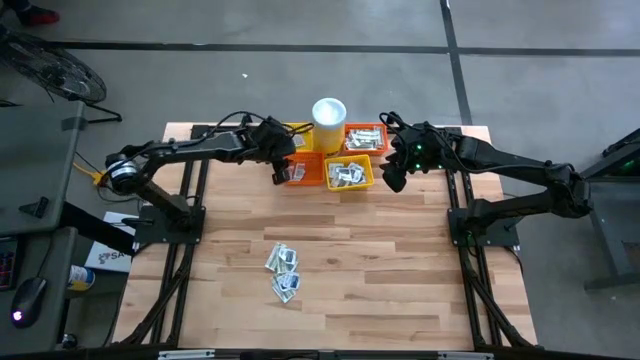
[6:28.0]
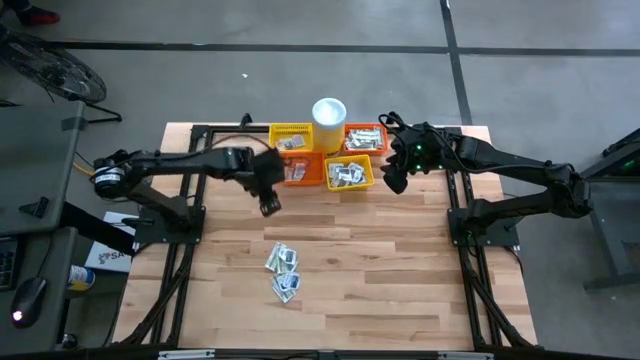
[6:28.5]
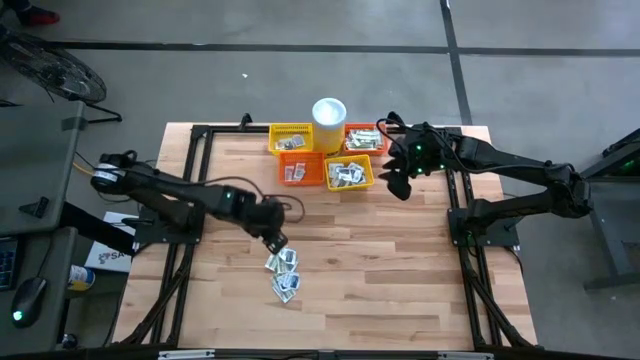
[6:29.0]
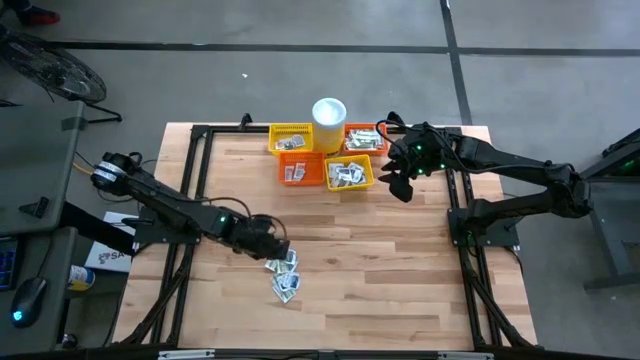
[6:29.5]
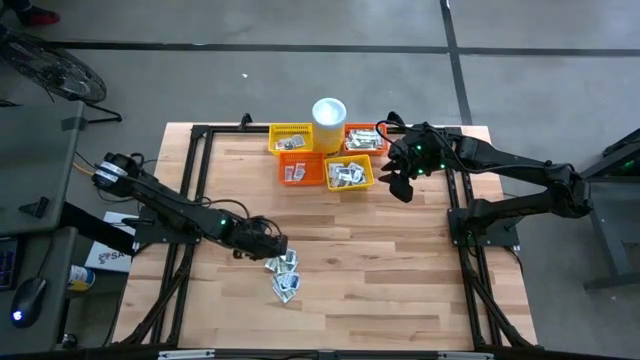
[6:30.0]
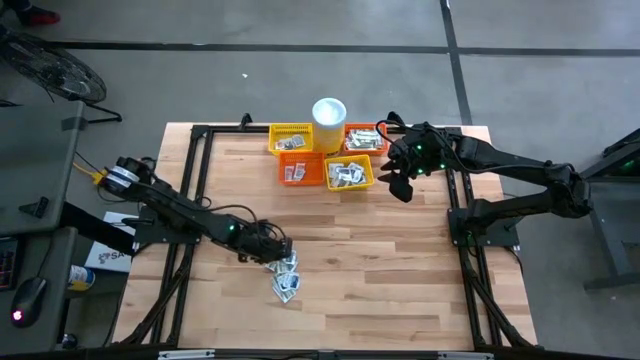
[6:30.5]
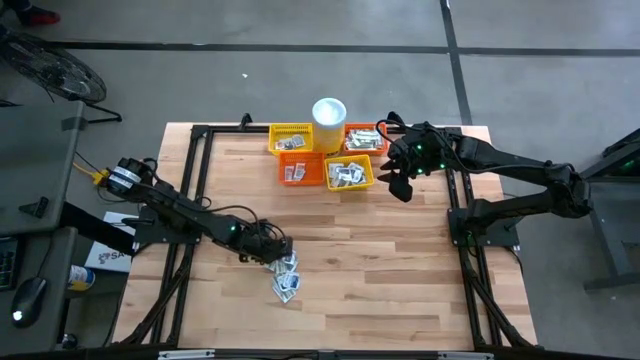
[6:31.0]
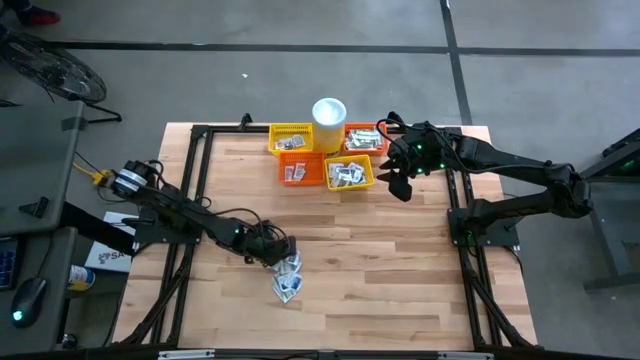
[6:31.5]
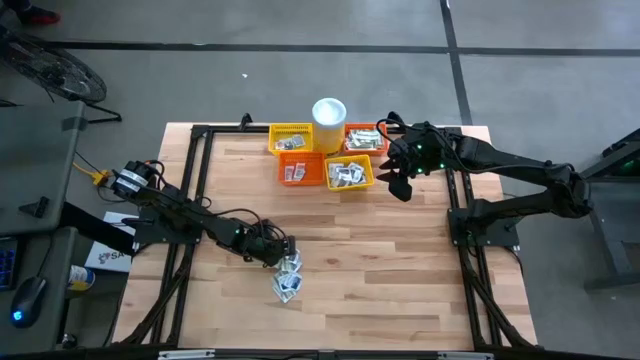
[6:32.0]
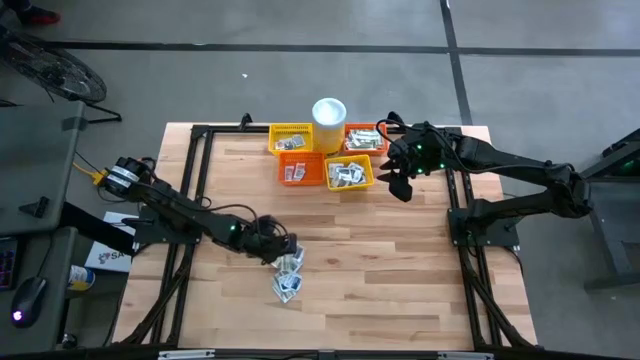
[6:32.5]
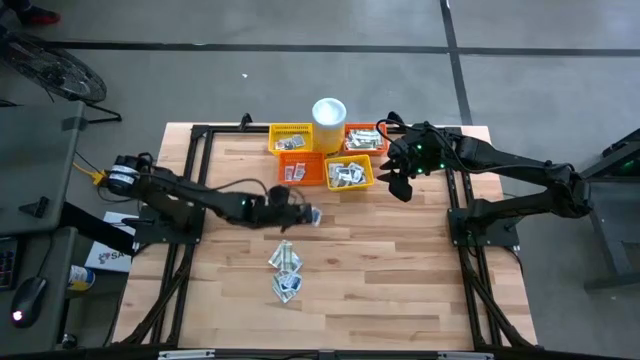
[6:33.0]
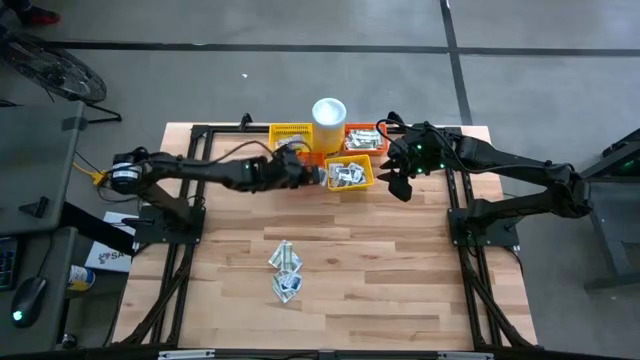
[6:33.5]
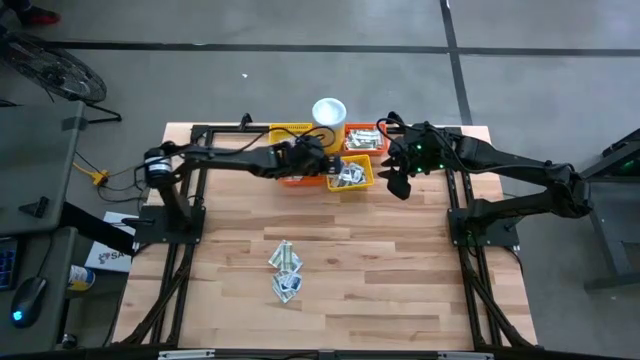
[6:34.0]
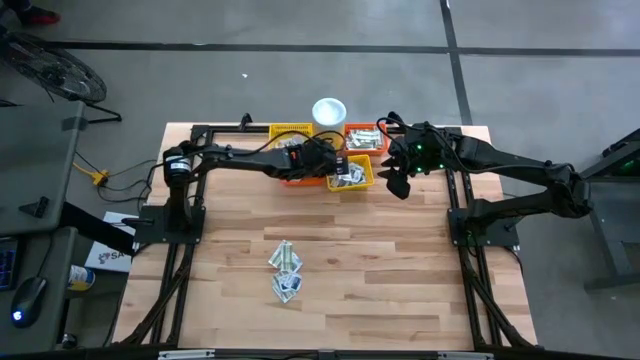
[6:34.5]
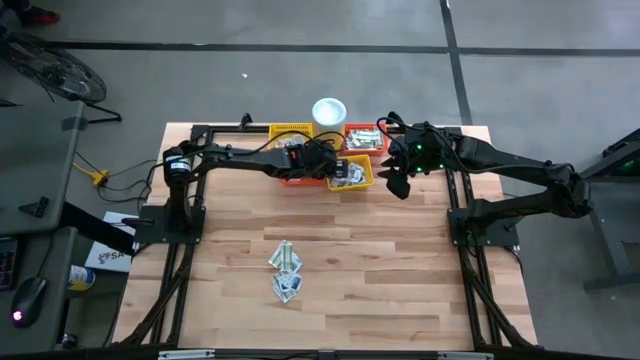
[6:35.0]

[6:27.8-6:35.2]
Task: Pick & Place First Aid Supplies
Put the black towelette pack into the bottom yellow basket

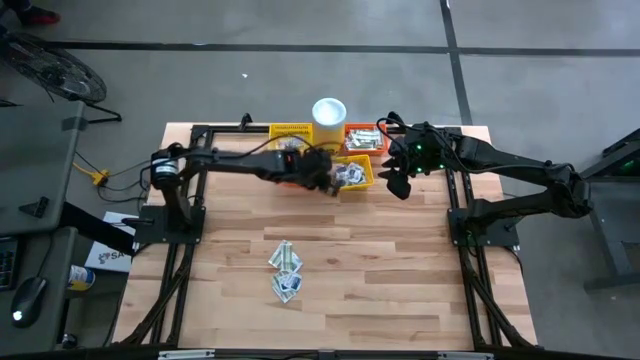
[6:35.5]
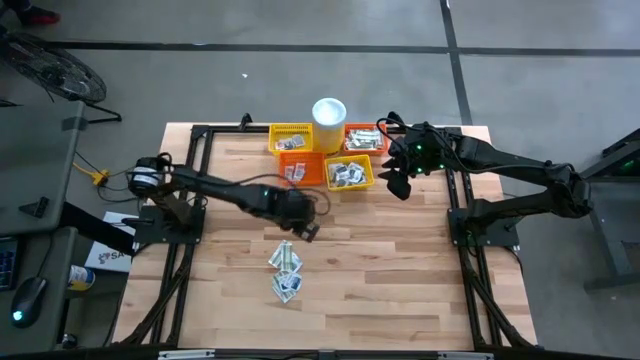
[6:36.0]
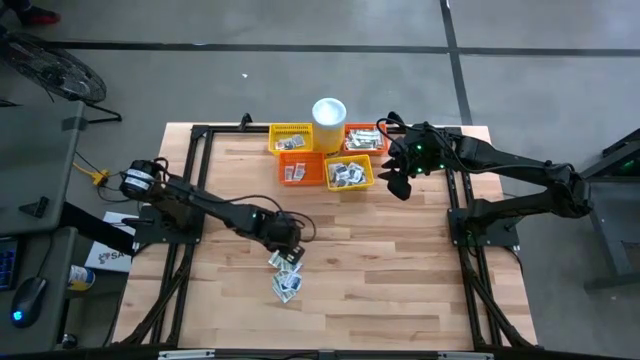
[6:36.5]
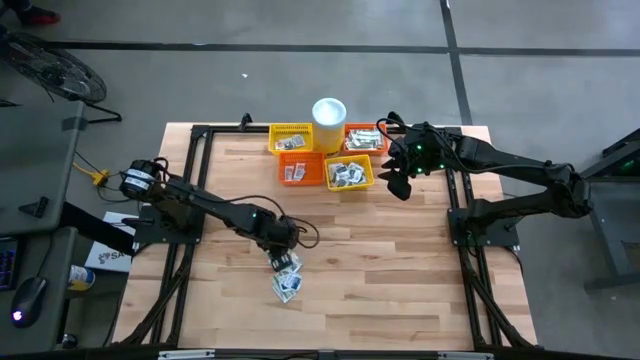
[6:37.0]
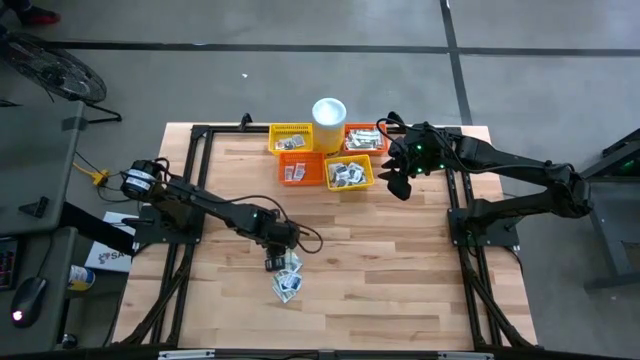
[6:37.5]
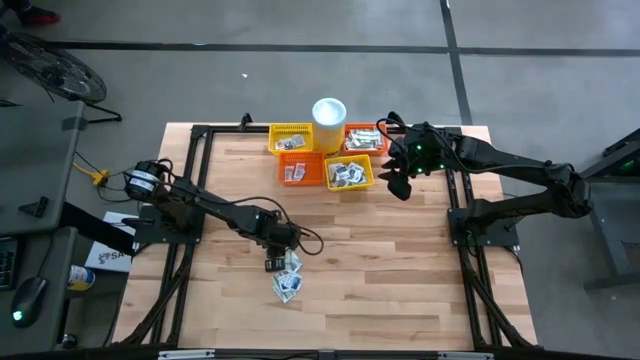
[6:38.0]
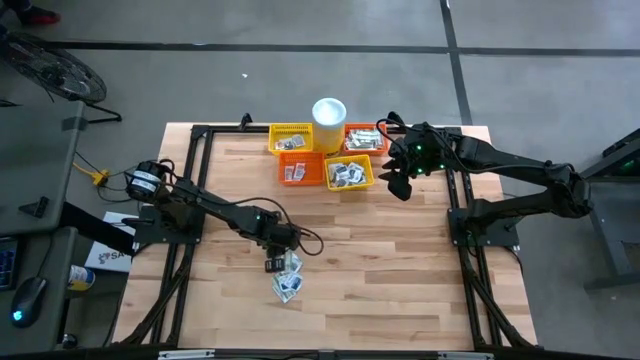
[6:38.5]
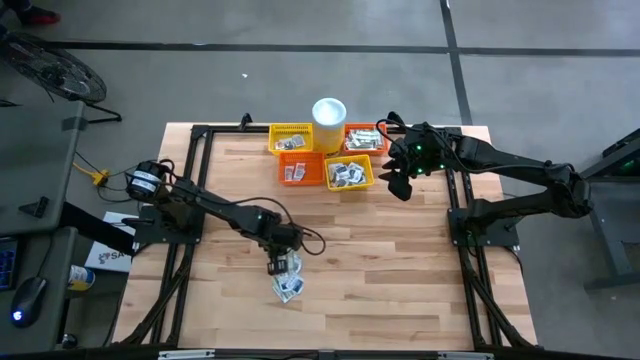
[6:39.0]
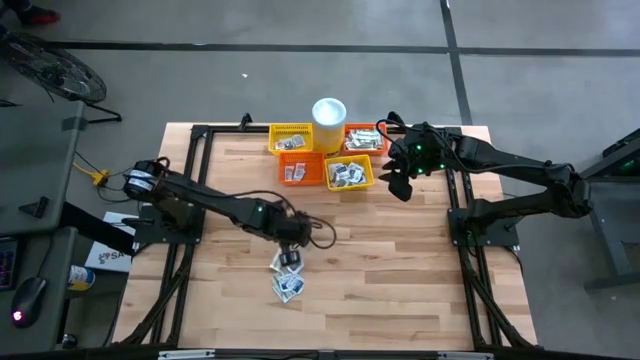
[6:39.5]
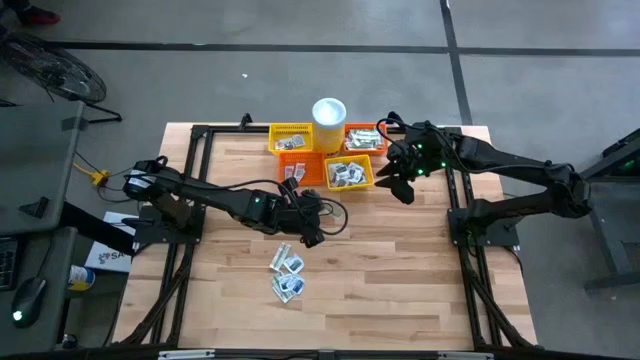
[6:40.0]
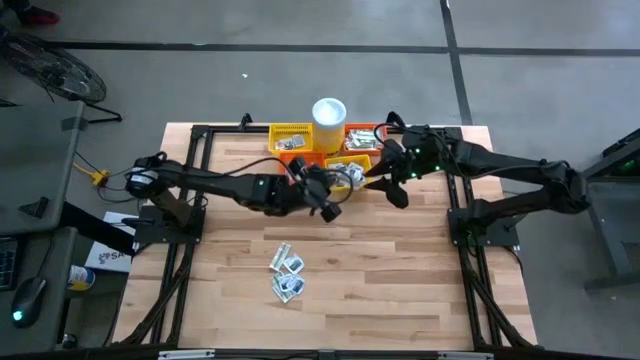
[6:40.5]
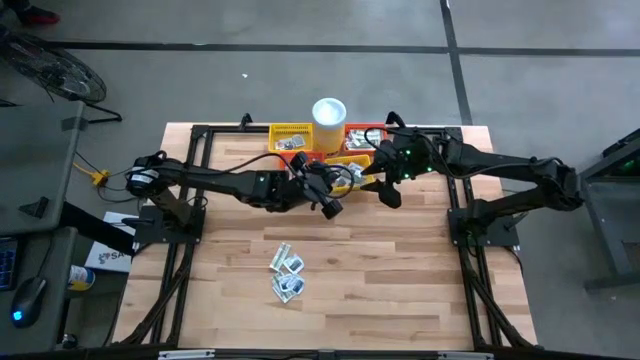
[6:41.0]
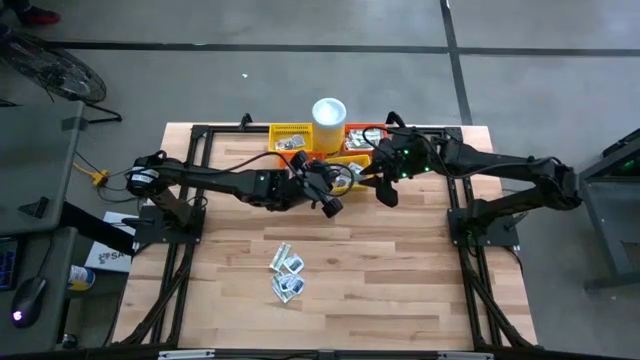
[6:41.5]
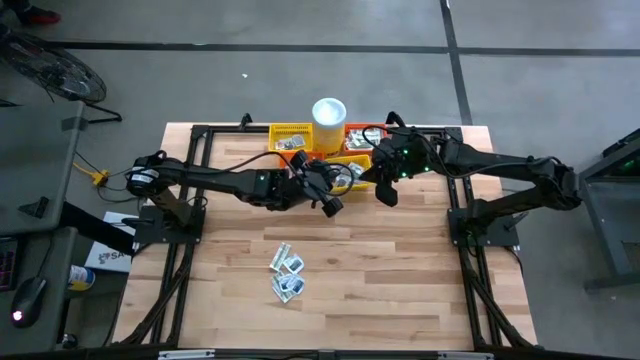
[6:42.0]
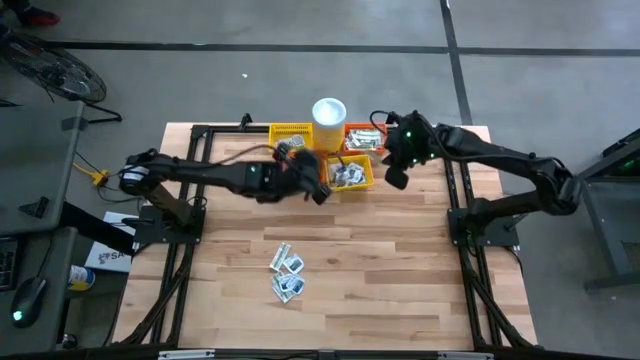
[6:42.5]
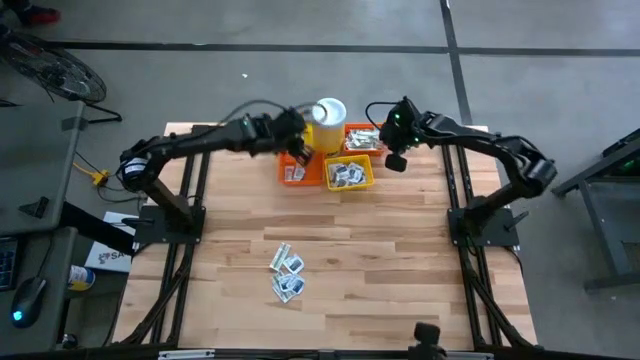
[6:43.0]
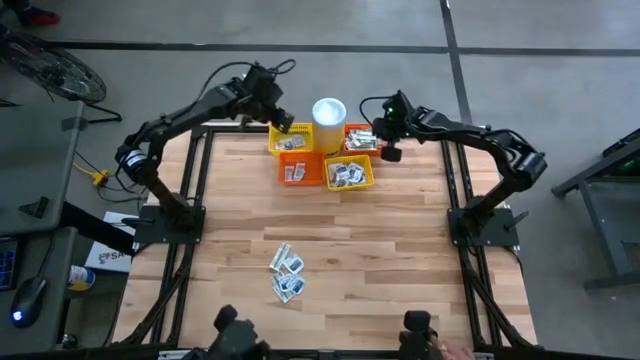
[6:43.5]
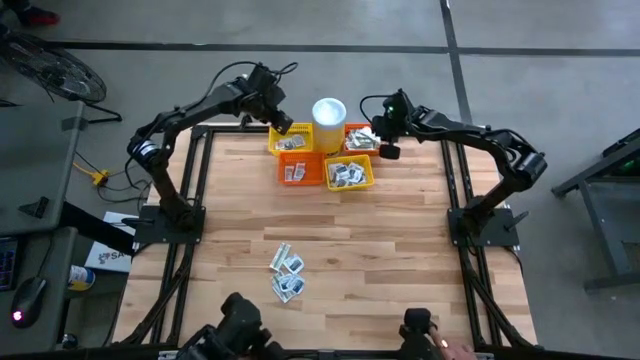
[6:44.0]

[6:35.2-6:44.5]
Put the green bandage pack into the top orange basket

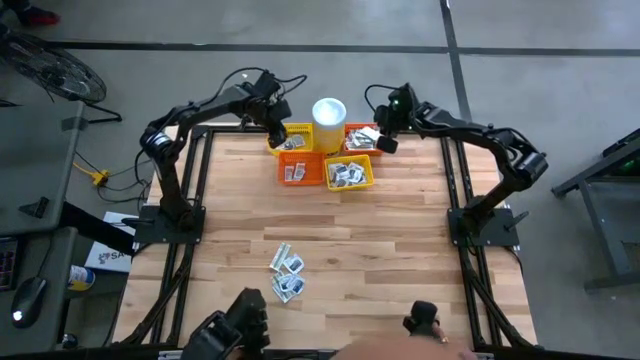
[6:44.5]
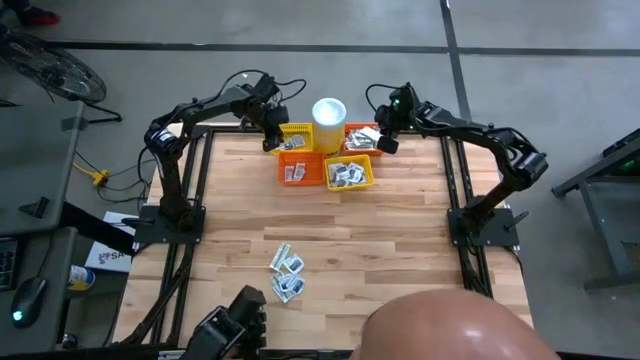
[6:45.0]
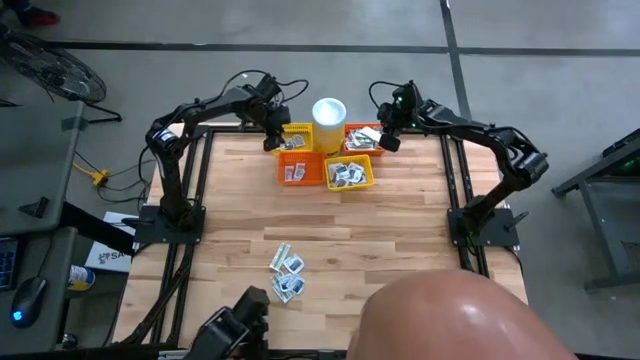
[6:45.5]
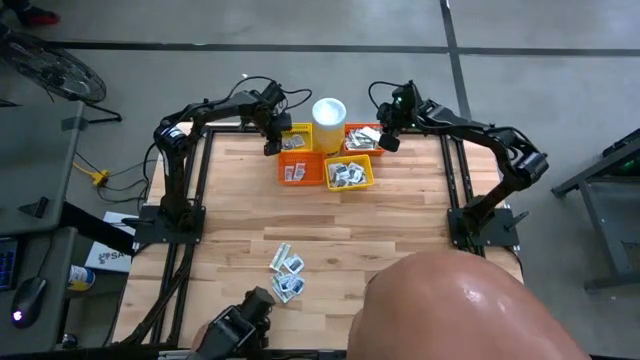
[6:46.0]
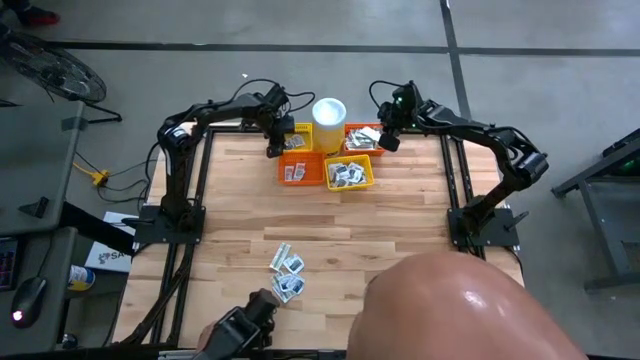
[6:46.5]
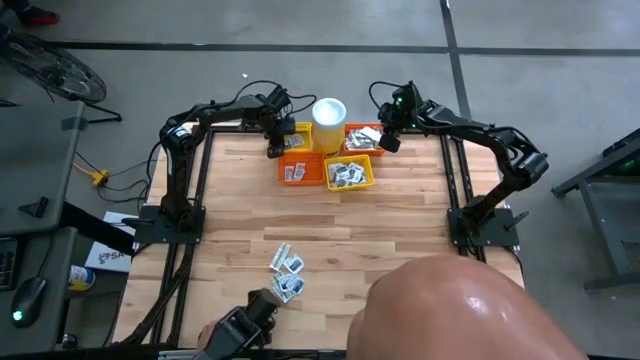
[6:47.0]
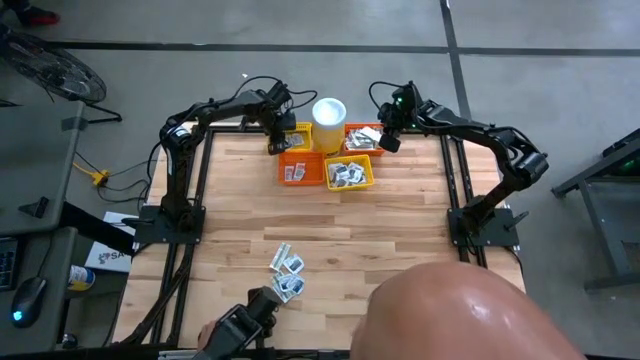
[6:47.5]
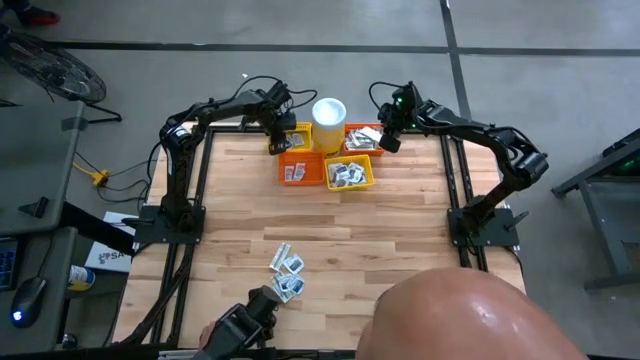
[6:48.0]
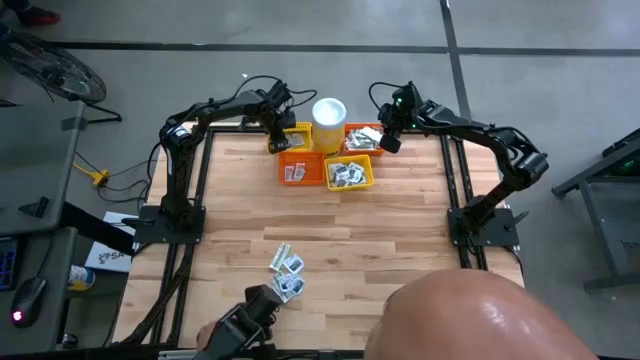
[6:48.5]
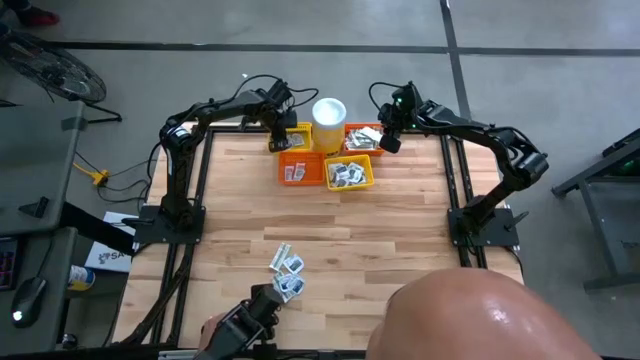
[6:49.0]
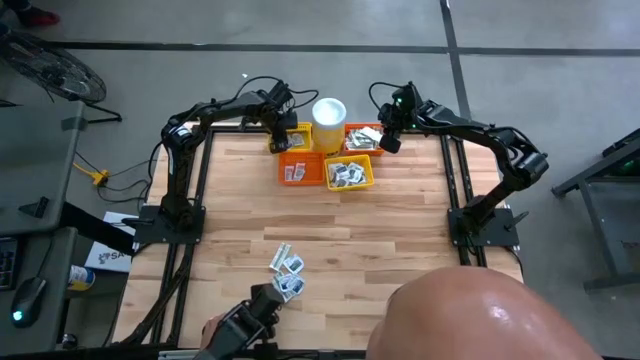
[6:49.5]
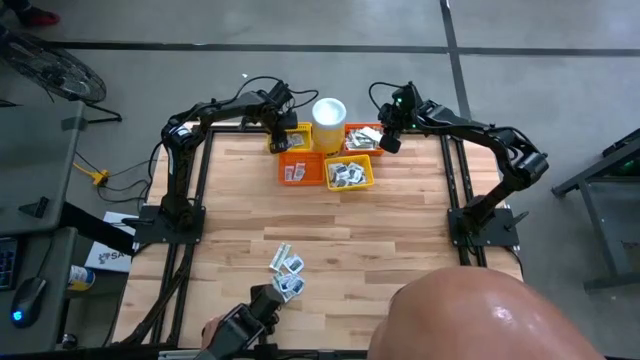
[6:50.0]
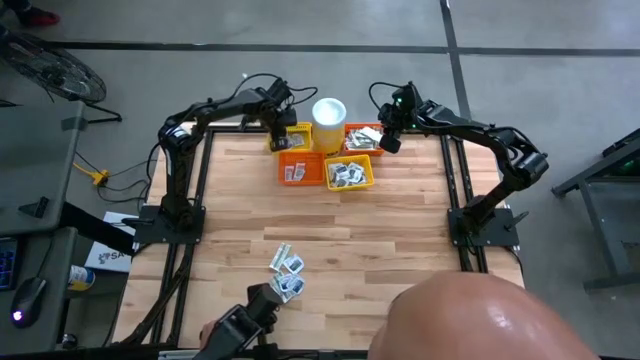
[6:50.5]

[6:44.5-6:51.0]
Put the orange ointment pack into the bottom orange basket
